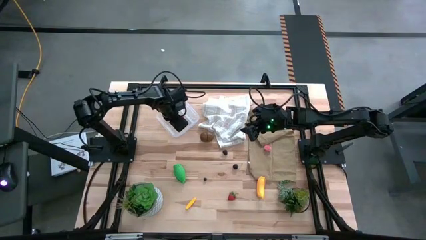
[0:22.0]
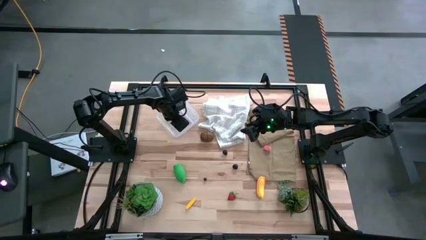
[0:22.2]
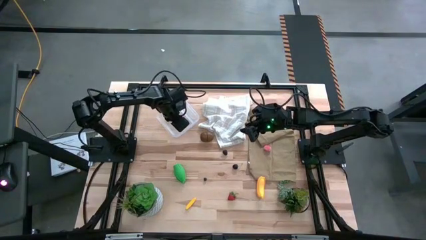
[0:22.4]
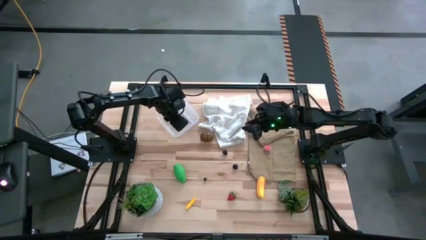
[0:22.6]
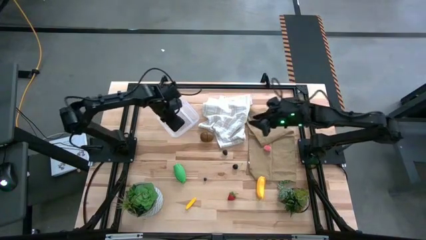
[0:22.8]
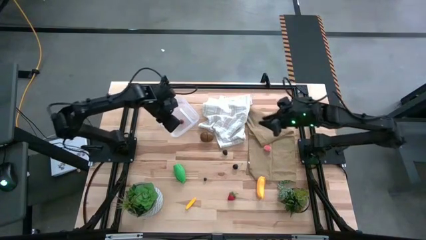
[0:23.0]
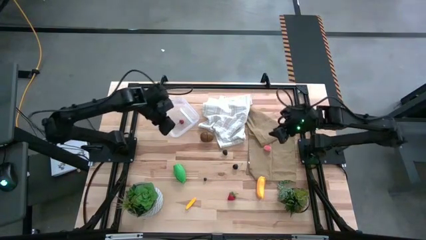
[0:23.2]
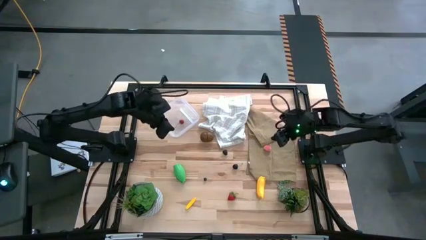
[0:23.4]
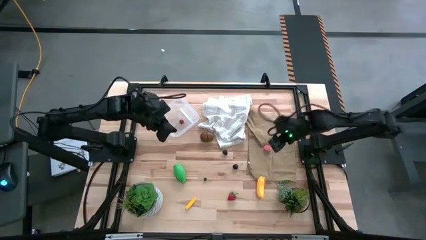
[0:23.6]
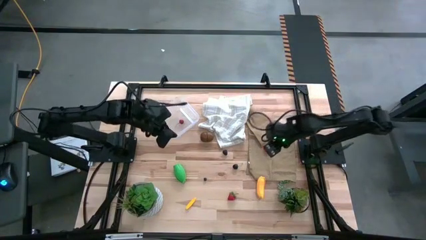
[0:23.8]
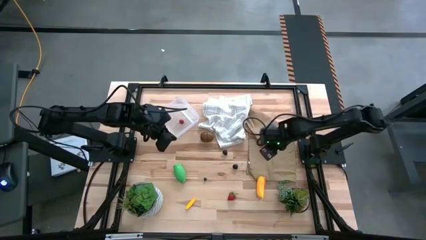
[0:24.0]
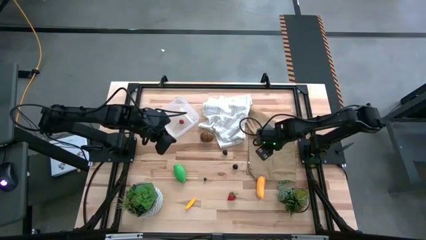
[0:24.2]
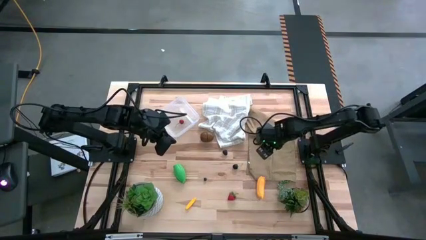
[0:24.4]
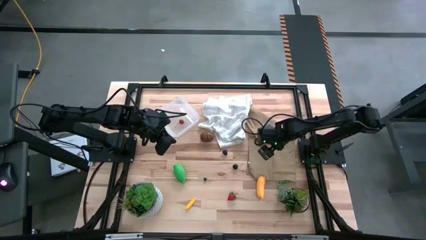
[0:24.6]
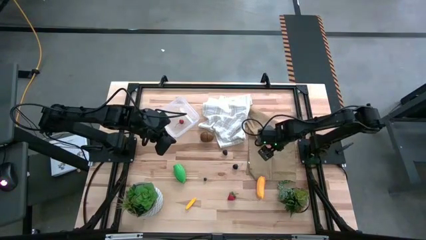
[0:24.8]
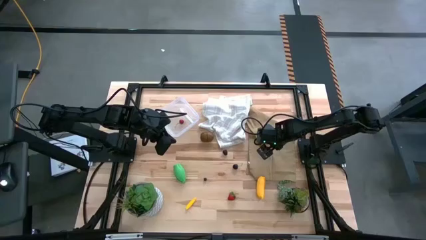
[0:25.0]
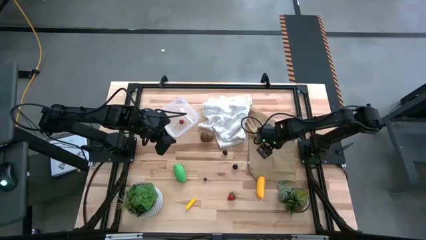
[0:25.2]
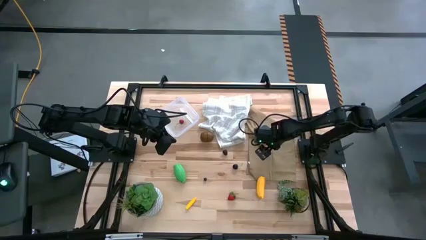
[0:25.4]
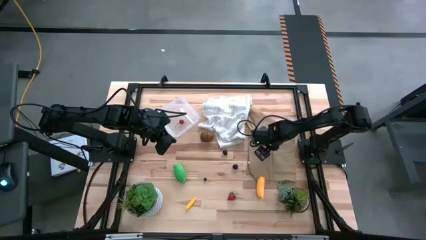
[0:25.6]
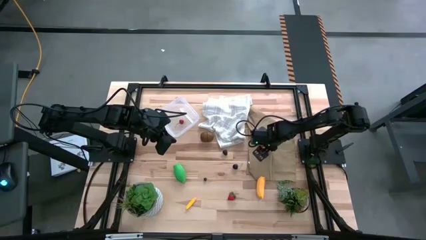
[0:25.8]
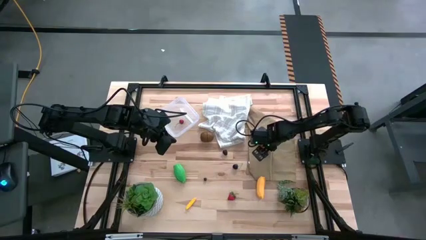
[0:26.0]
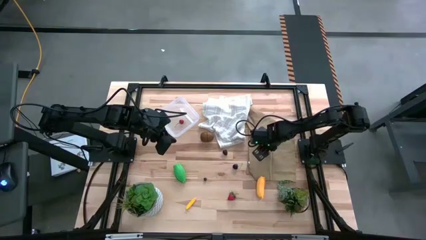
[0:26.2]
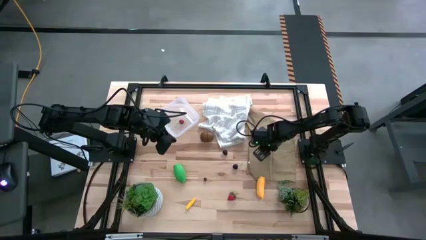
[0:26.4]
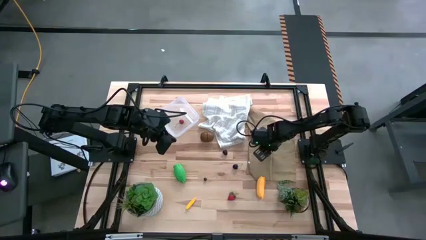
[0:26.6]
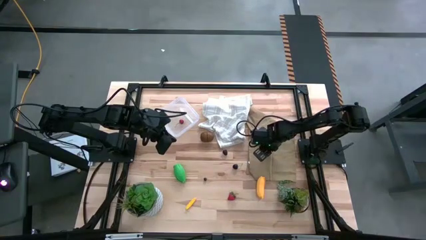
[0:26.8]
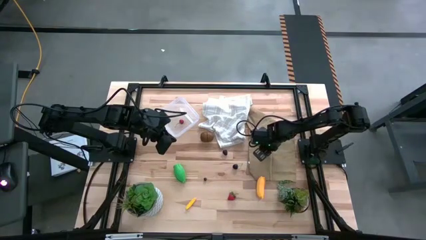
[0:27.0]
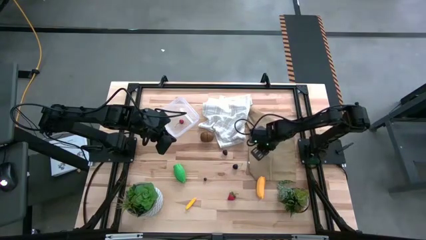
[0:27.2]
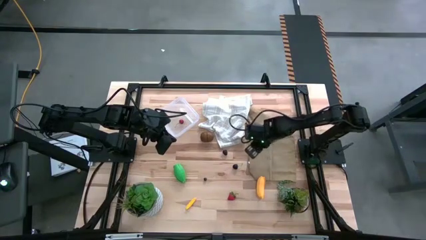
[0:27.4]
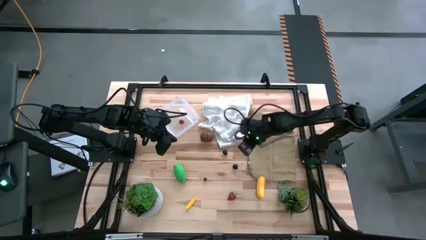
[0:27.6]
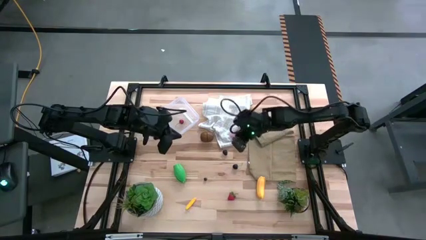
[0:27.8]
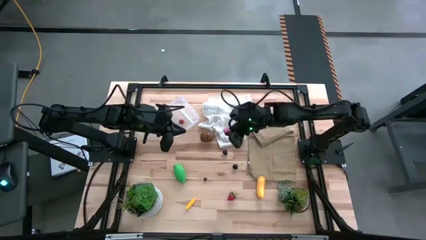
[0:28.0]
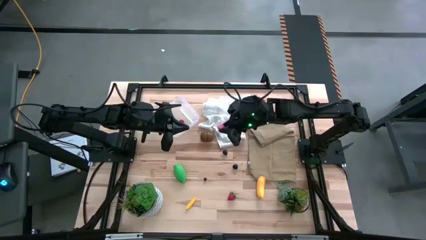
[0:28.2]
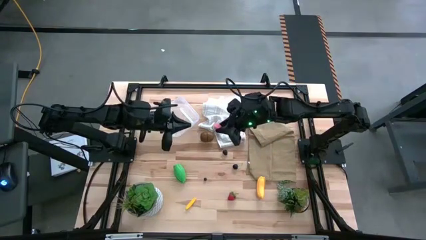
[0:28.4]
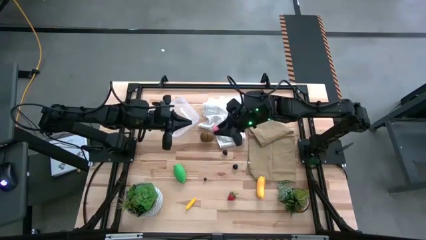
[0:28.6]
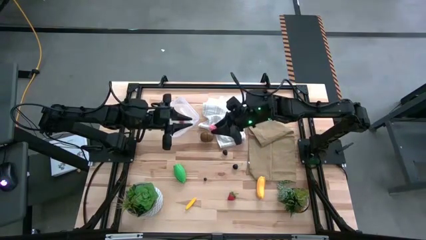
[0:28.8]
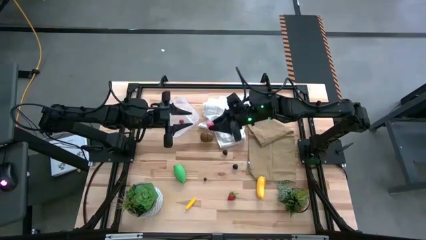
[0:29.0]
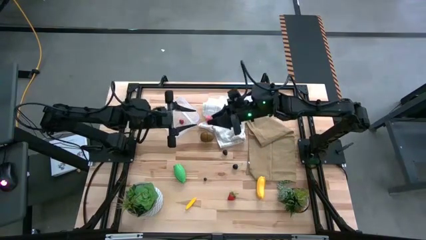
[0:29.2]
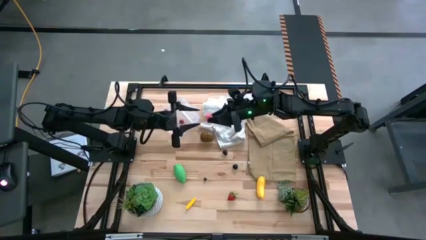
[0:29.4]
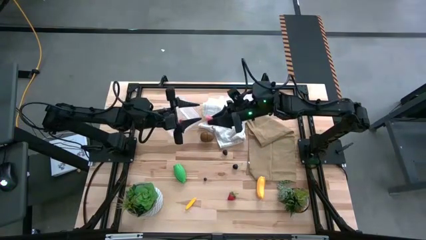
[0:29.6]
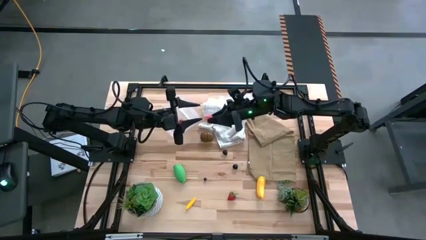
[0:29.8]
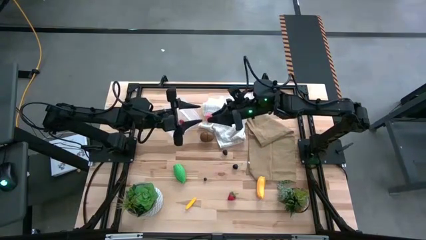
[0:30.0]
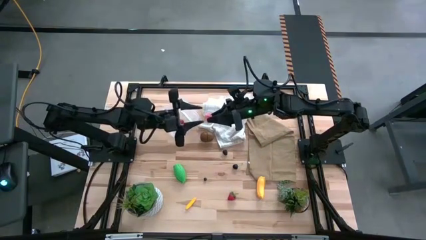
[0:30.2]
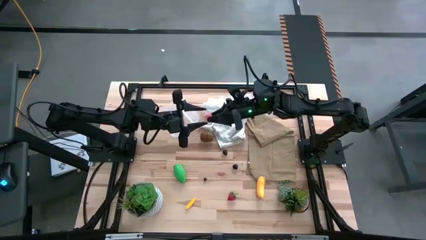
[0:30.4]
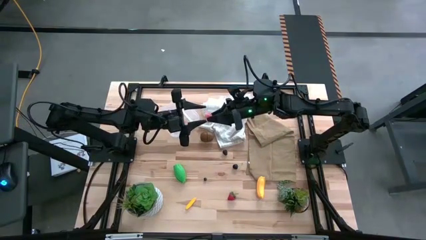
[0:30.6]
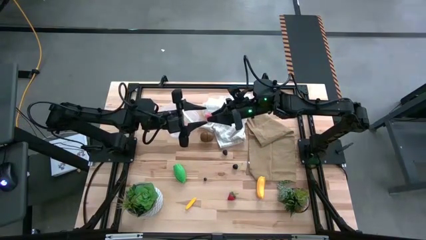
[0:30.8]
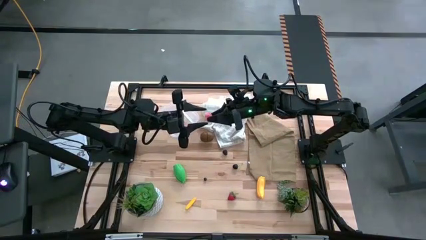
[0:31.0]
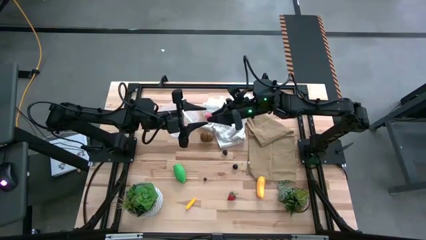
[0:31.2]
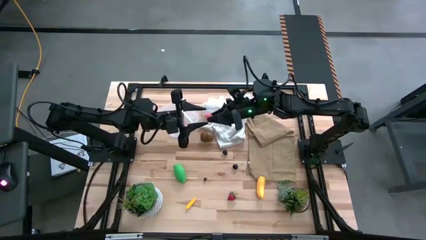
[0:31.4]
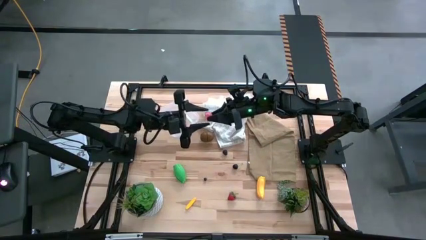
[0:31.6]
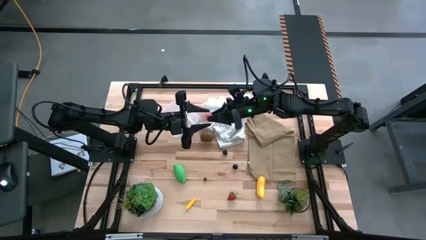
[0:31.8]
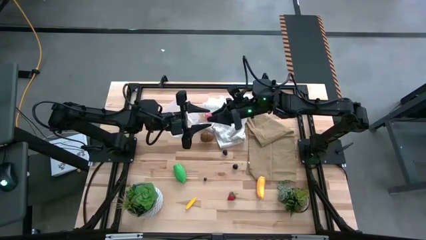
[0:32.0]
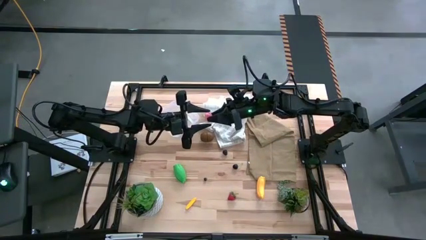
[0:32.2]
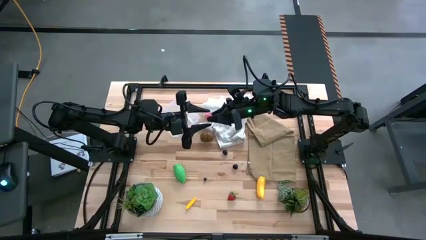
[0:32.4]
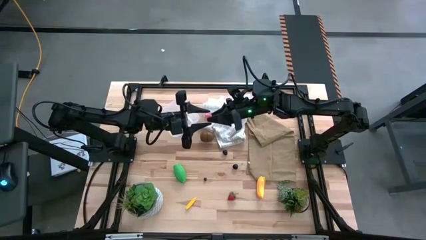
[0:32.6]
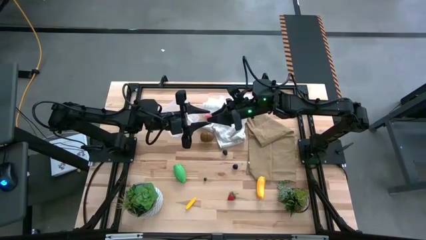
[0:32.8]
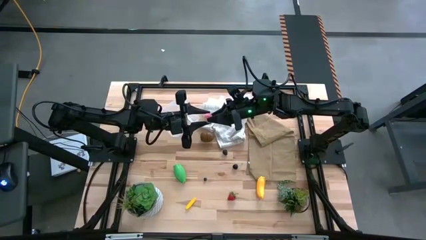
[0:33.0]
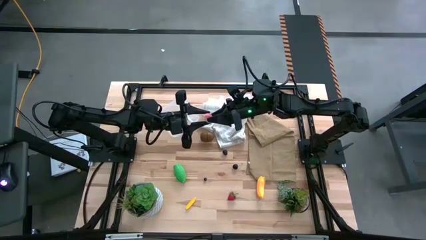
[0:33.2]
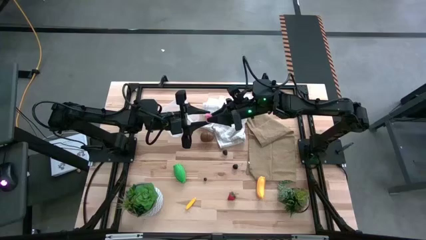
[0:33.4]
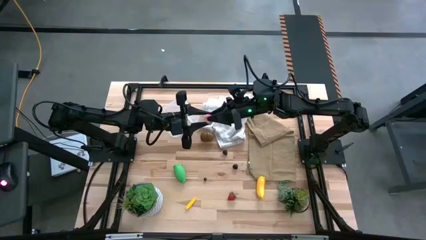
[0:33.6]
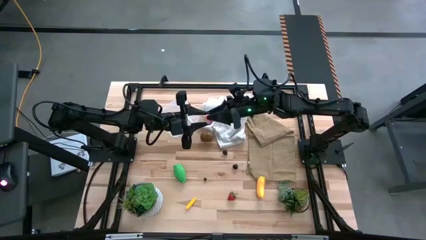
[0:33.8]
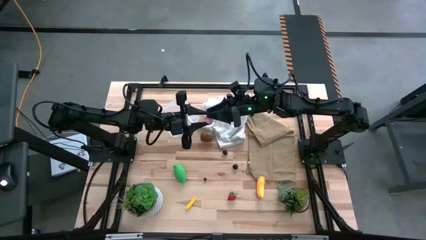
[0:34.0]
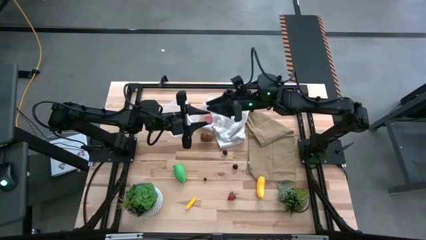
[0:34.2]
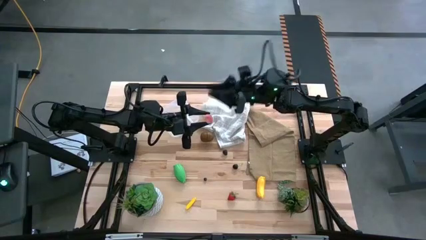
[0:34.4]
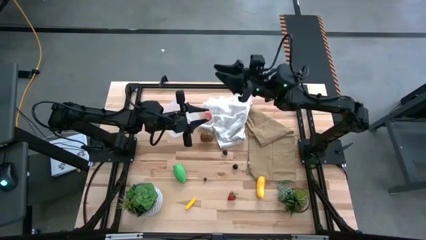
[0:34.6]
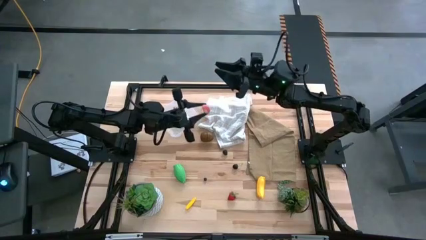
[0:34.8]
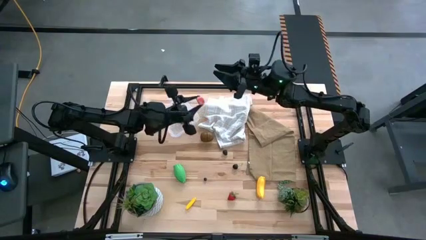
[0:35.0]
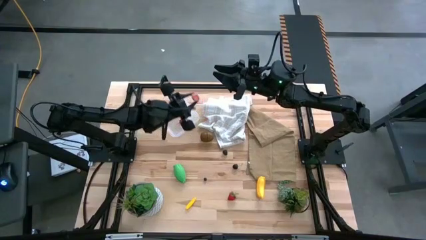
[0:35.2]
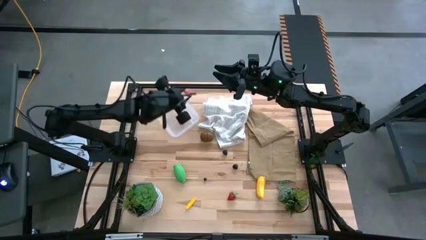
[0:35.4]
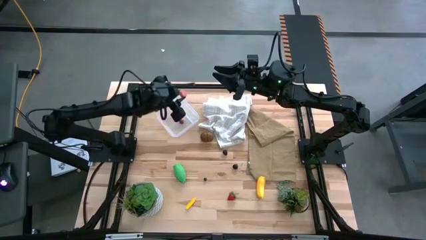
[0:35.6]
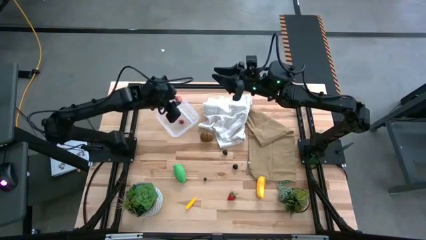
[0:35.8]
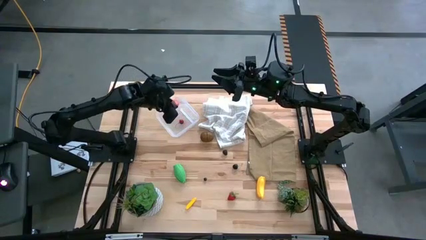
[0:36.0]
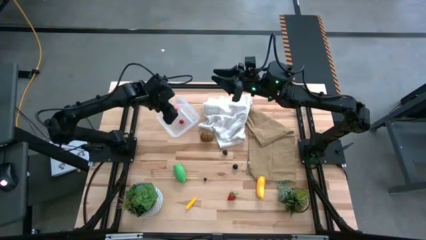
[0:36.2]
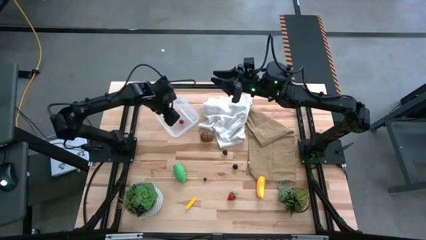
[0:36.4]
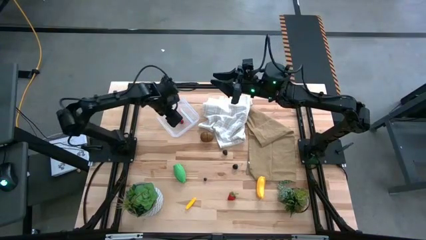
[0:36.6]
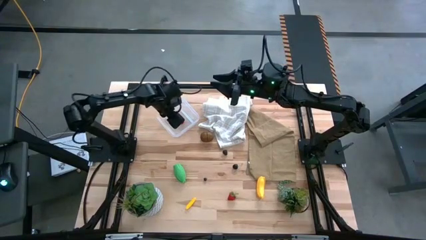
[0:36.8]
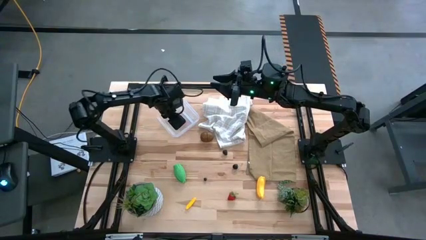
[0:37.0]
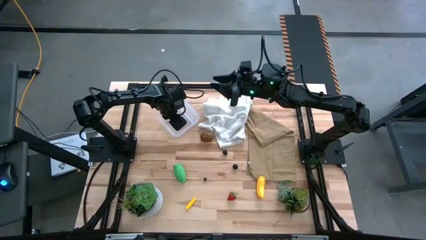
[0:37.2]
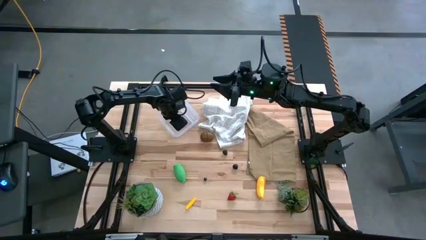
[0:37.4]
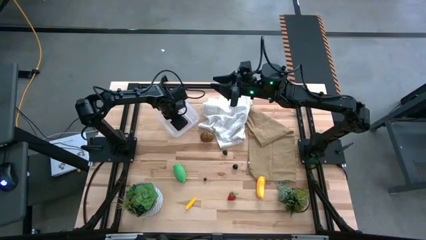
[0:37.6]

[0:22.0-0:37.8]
Task: Pick and placing Produce into tupperware
Put the pink peach into the transparent bin
